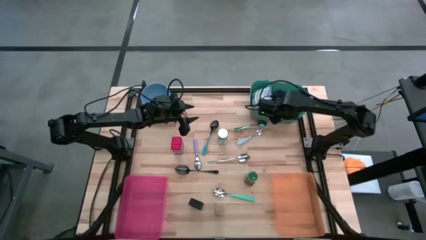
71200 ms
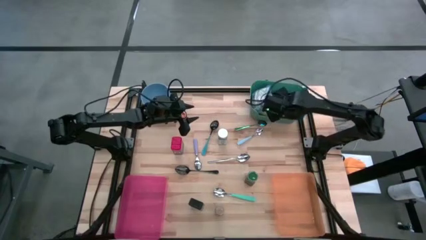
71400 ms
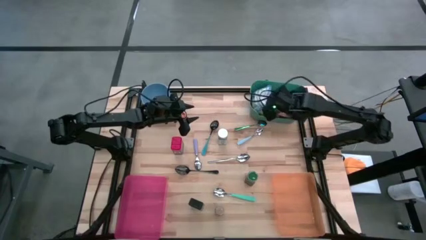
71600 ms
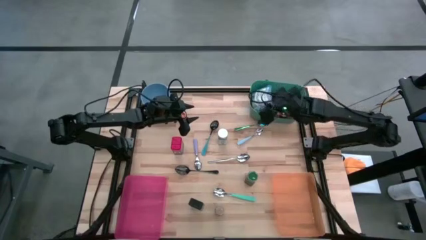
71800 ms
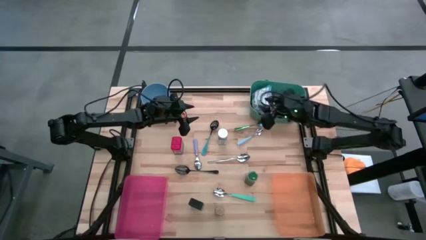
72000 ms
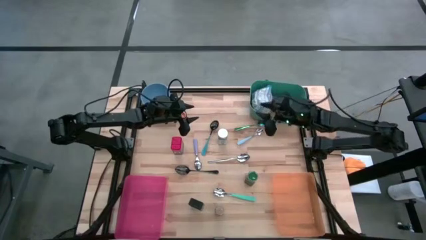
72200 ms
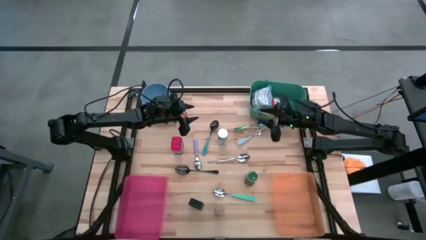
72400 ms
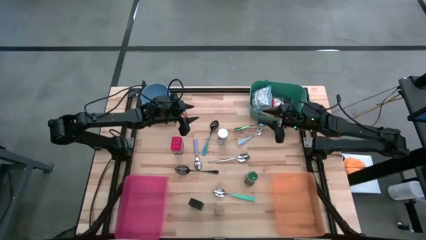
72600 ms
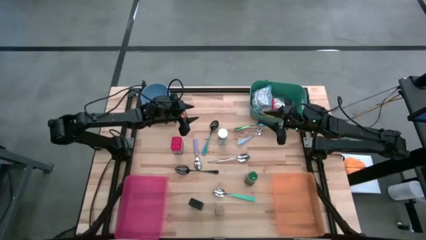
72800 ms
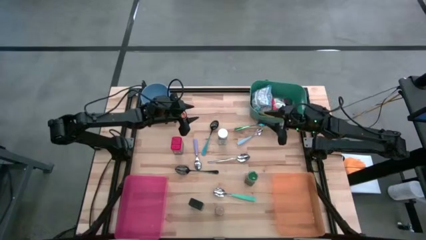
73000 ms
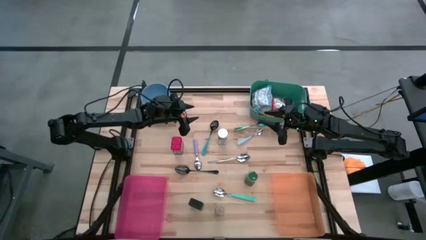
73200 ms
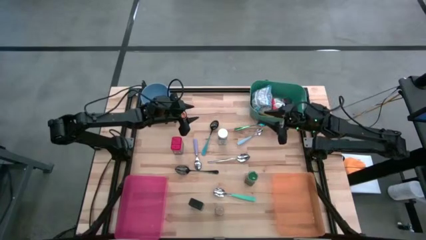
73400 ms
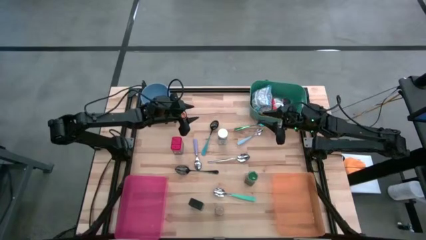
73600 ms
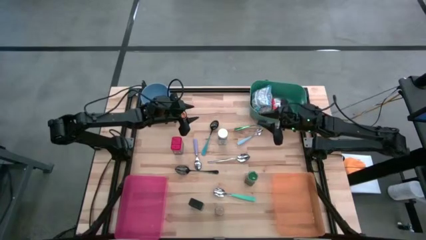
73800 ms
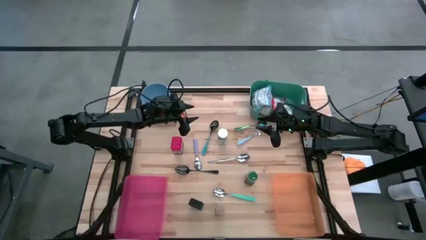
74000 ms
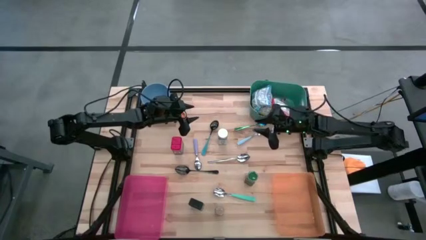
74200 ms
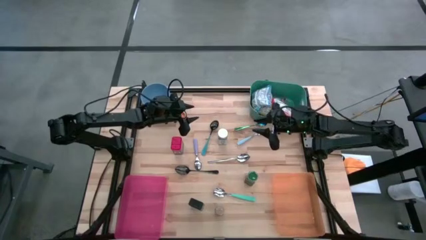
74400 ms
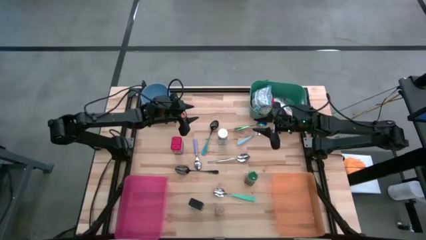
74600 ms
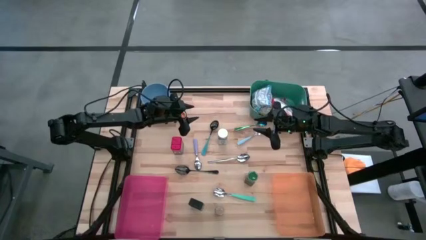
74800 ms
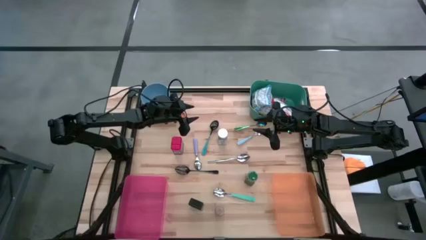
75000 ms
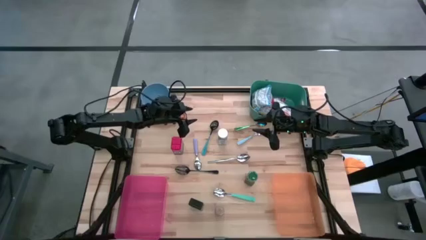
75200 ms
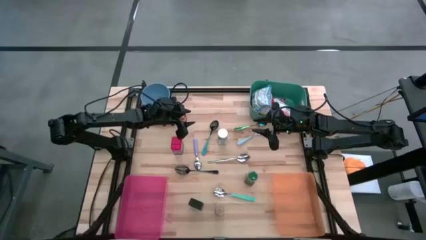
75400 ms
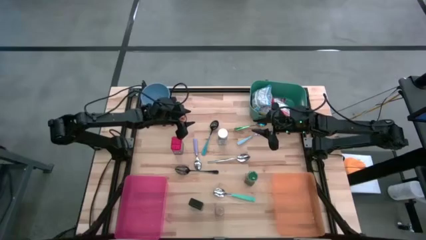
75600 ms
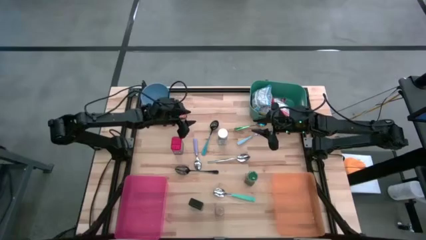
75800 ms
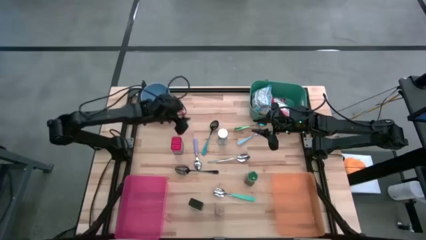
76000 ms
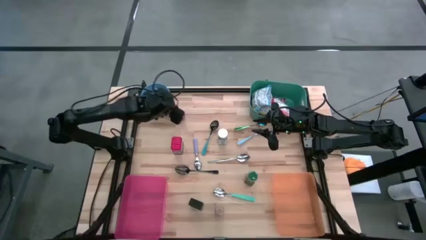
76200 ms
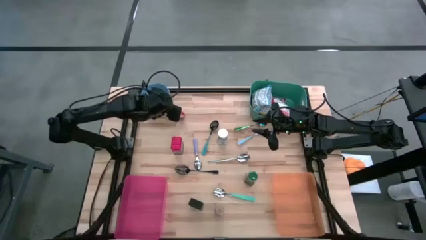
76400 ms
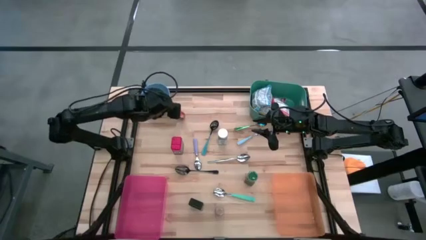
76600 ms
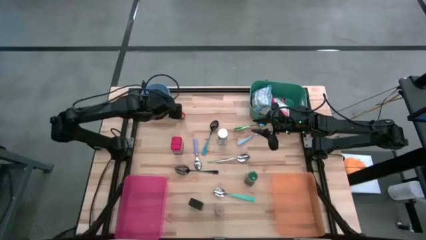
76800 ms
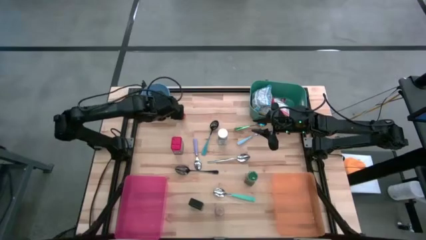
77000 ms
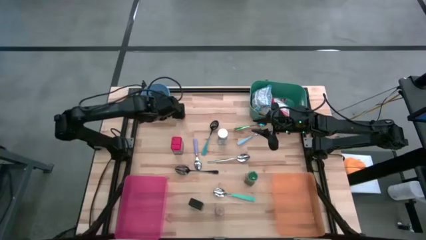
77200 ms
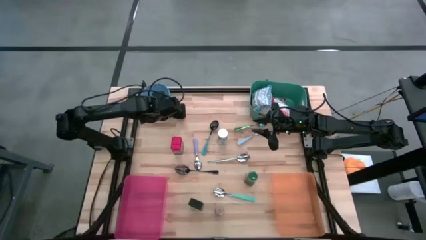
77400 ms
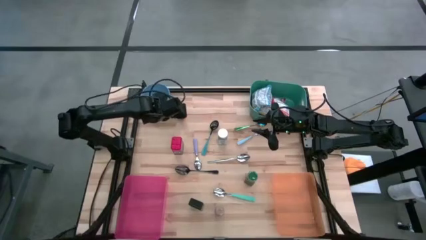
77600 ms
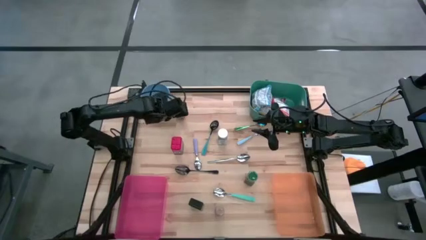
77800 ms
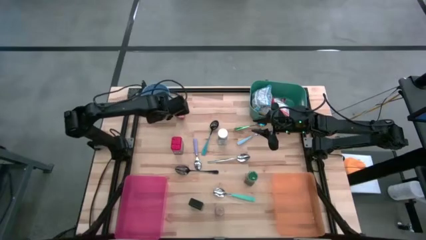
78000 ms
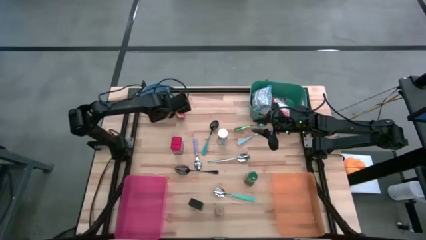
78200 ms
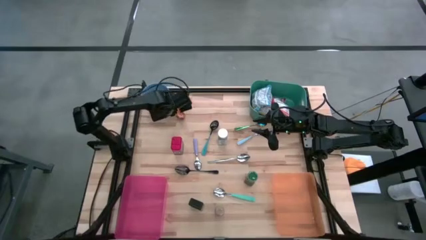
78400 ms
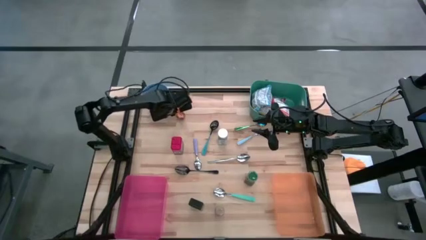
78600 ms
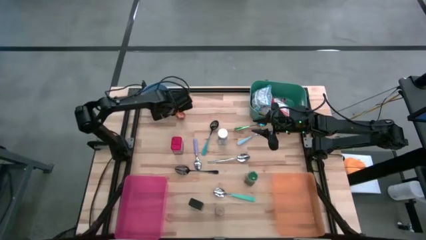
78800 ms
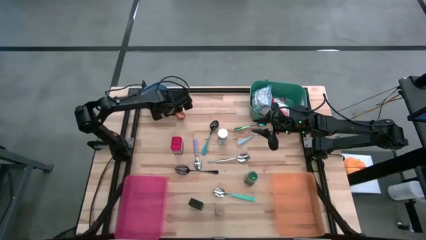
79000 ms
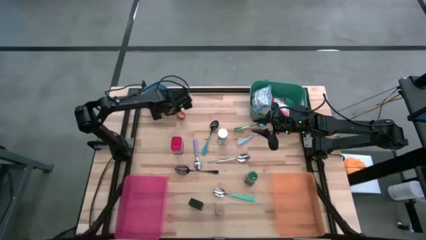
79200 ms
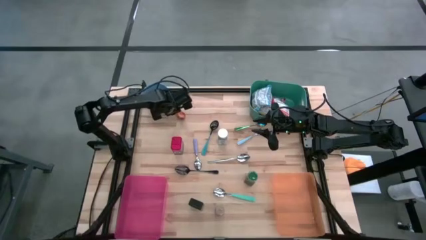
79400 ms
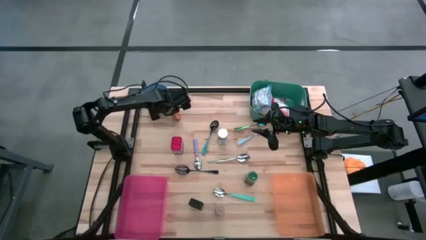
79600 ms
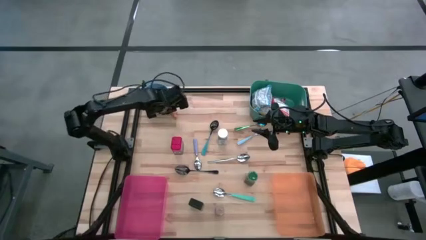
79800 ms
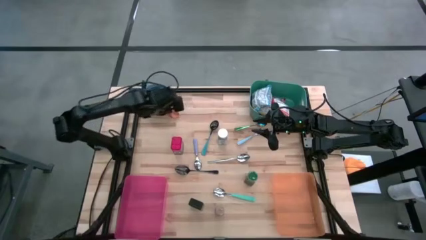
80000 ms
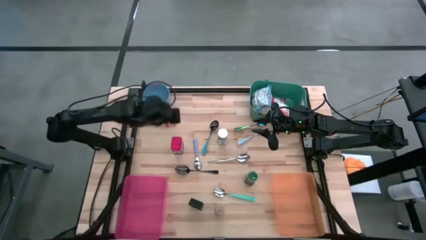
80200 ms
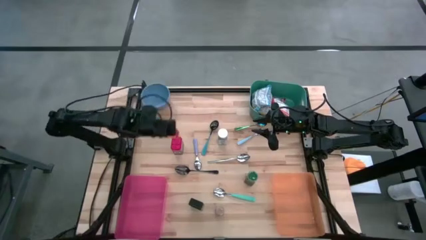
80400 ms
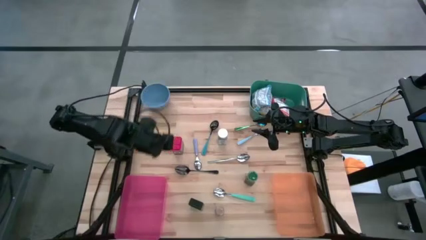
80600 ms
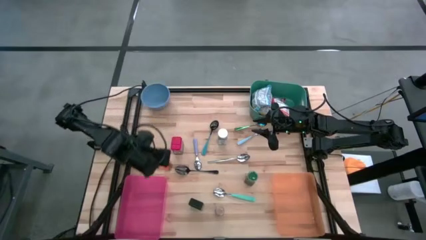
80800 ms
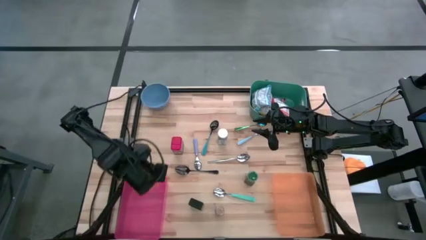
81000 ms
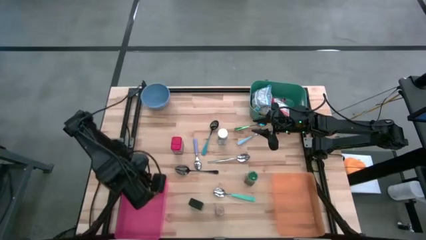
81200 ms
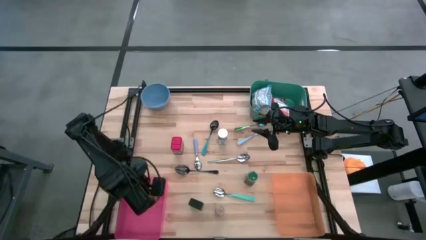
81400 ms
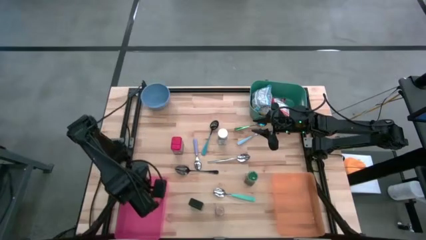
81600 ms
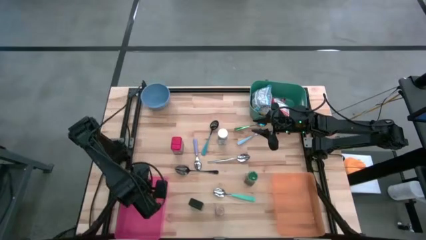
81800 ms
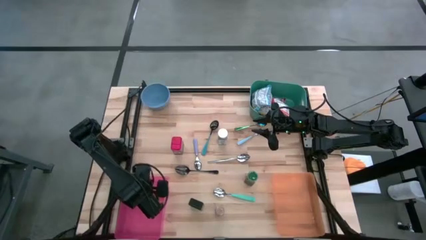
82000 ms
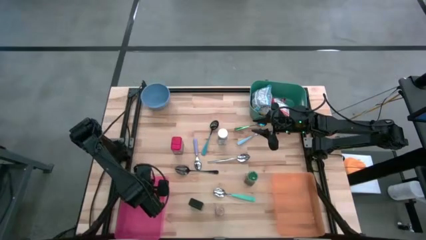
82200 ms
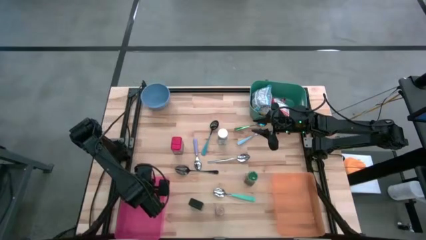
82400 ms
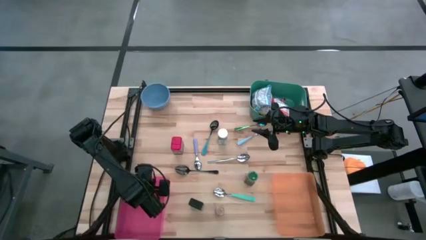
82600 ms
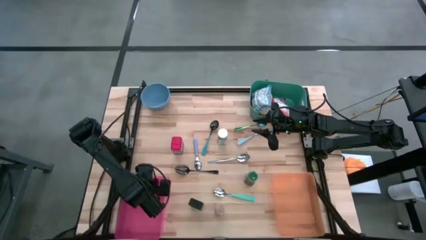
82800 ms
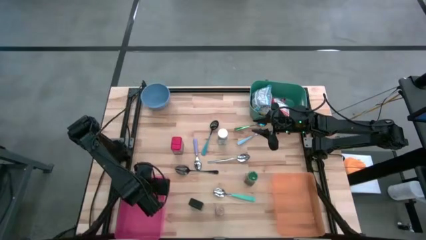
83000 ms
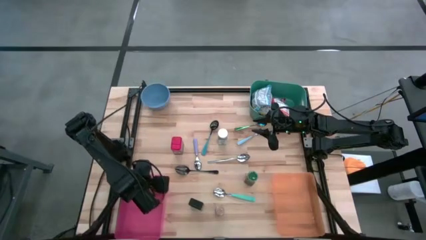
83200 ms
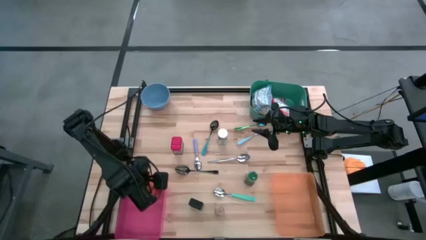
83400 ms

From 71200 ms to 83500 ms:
Put the orange seasoning pack into the pink bin
